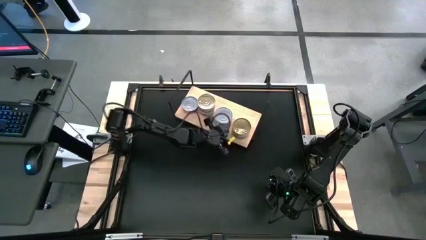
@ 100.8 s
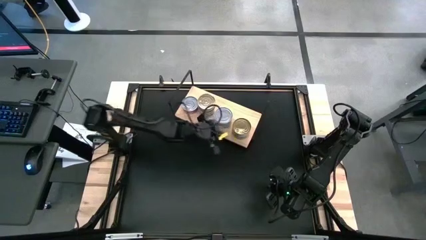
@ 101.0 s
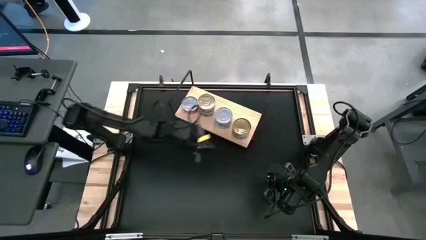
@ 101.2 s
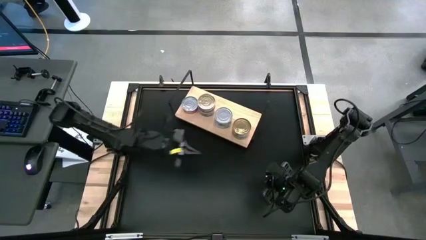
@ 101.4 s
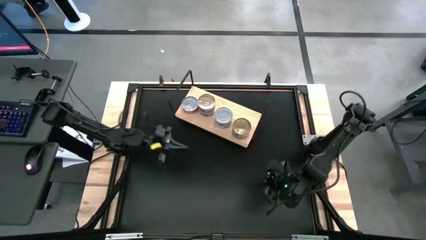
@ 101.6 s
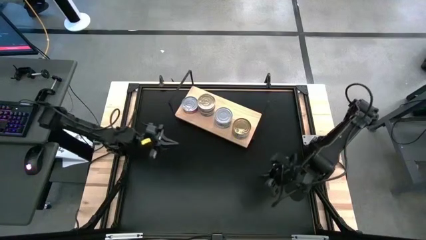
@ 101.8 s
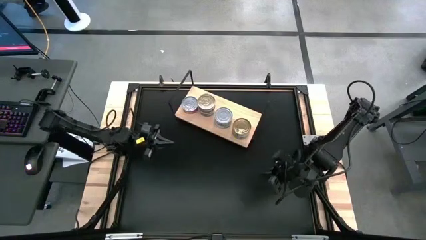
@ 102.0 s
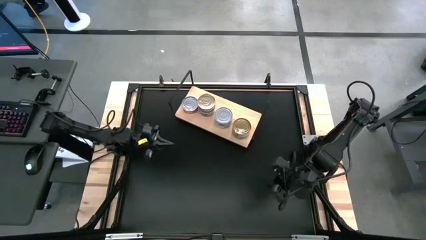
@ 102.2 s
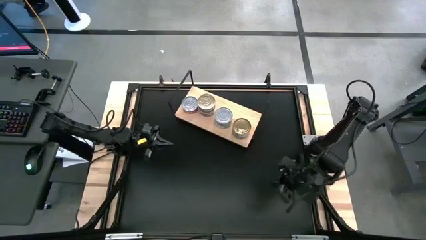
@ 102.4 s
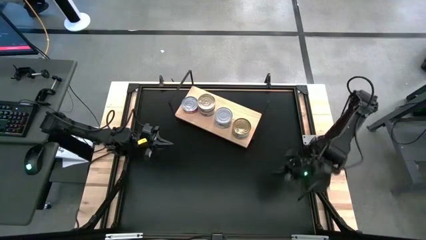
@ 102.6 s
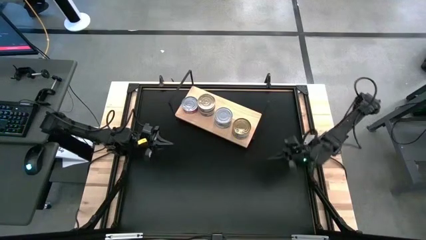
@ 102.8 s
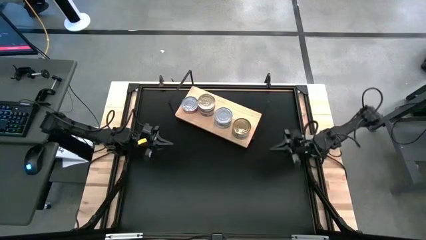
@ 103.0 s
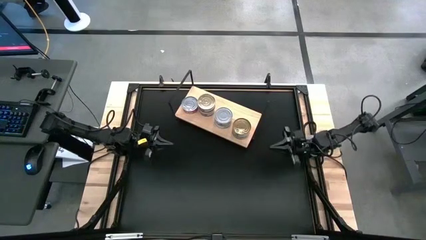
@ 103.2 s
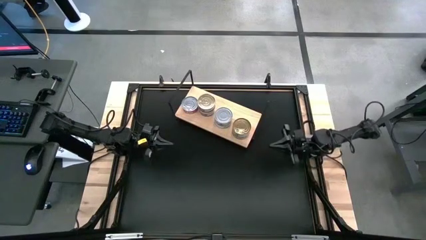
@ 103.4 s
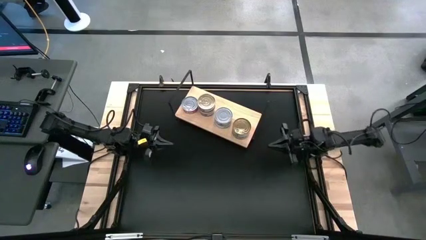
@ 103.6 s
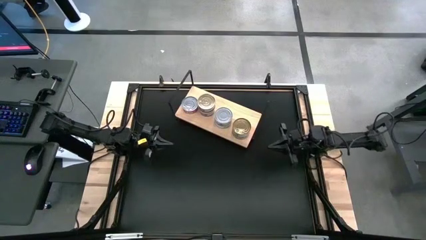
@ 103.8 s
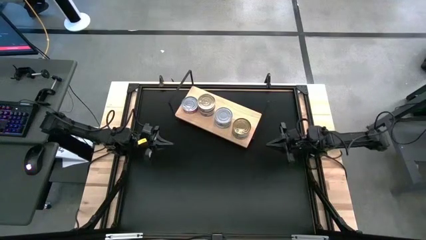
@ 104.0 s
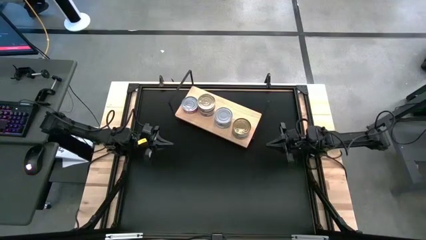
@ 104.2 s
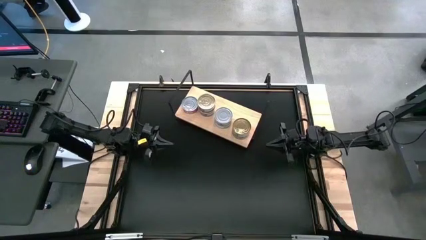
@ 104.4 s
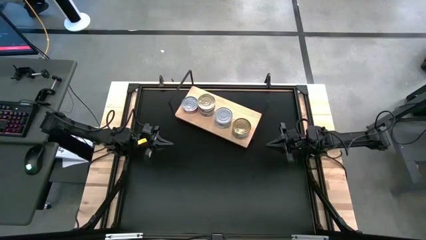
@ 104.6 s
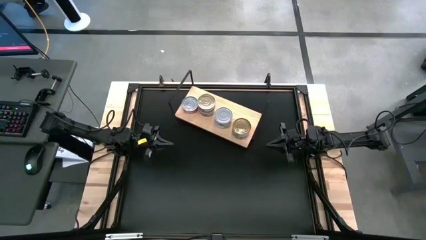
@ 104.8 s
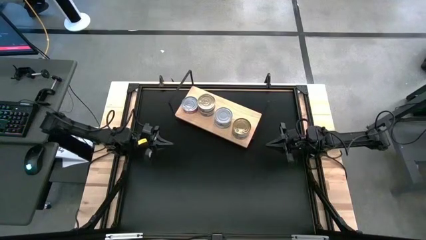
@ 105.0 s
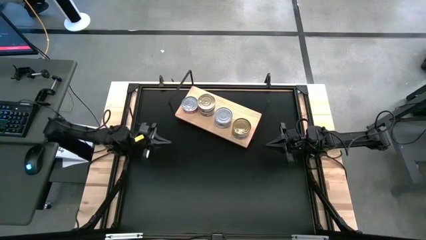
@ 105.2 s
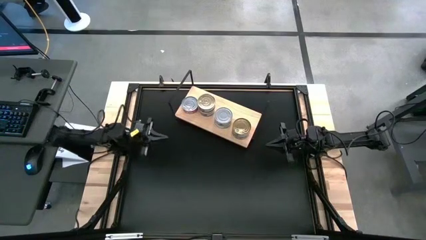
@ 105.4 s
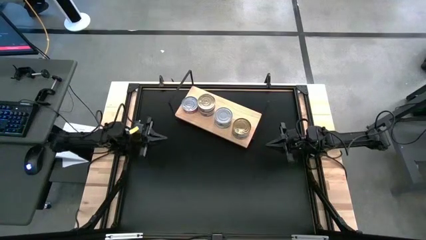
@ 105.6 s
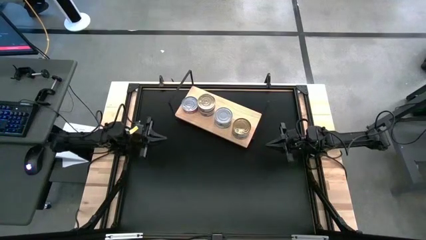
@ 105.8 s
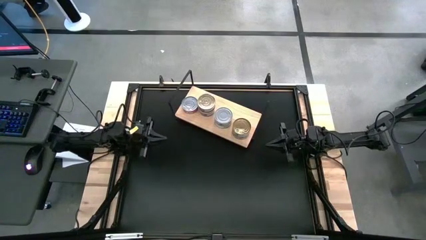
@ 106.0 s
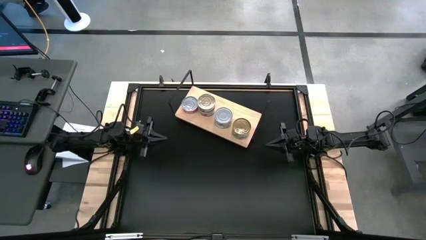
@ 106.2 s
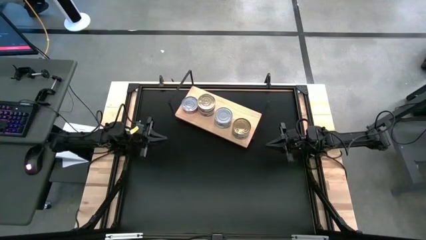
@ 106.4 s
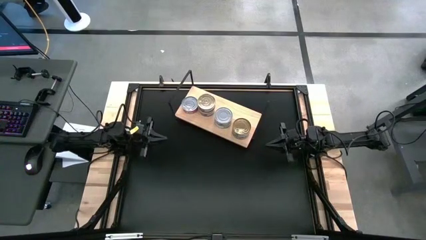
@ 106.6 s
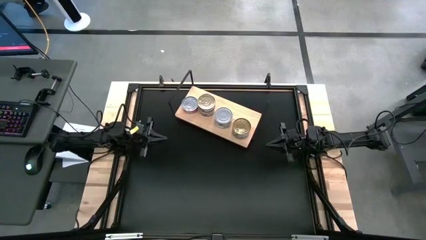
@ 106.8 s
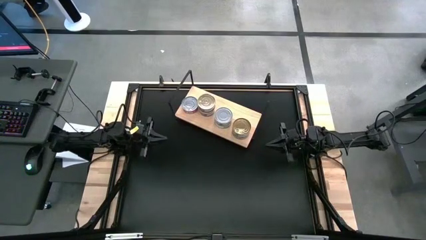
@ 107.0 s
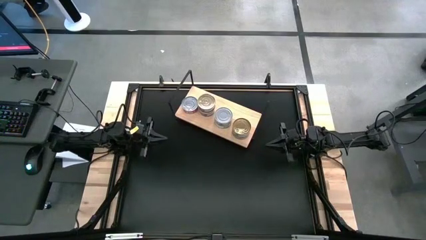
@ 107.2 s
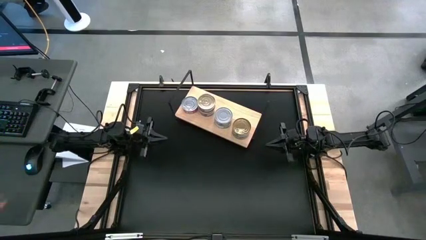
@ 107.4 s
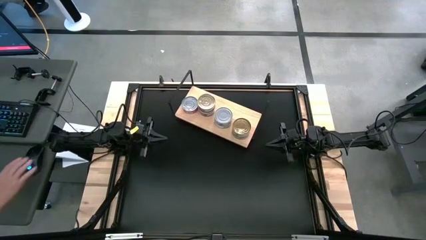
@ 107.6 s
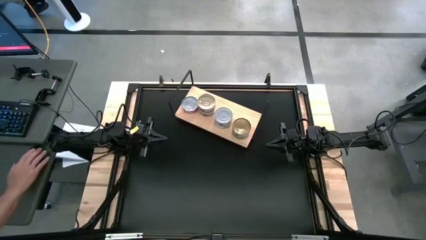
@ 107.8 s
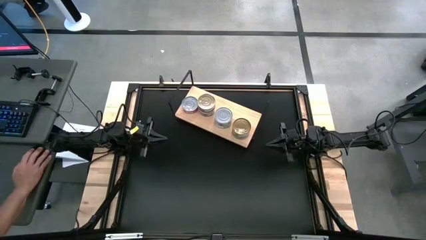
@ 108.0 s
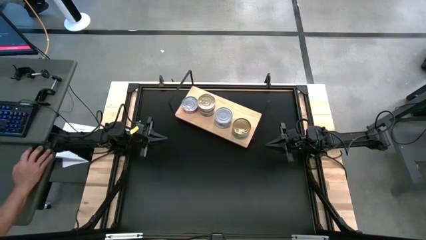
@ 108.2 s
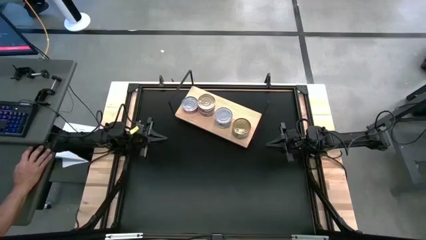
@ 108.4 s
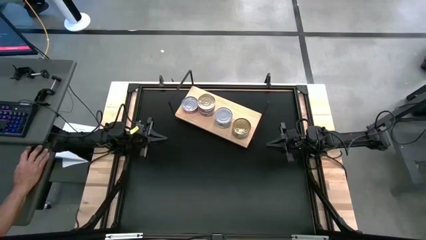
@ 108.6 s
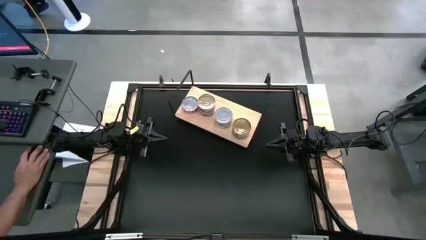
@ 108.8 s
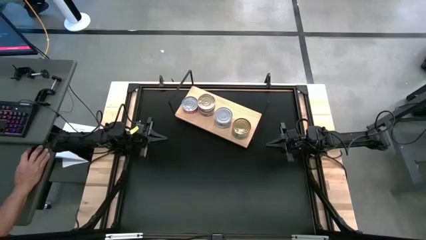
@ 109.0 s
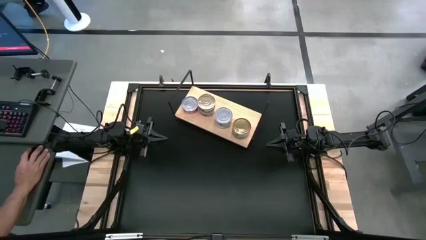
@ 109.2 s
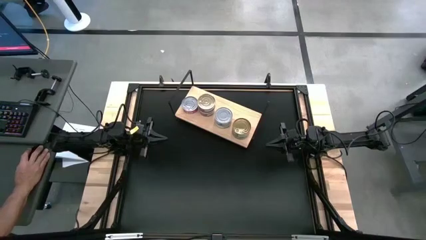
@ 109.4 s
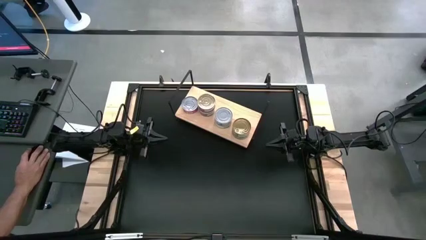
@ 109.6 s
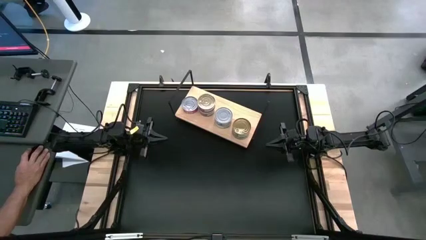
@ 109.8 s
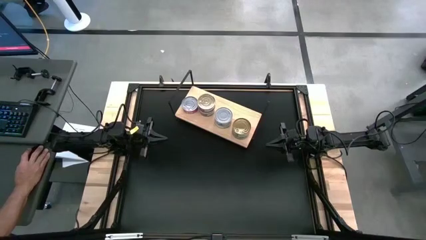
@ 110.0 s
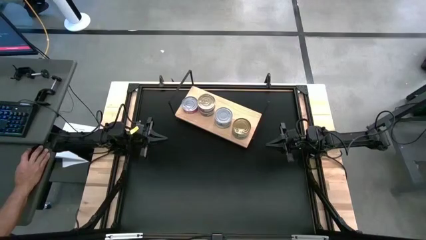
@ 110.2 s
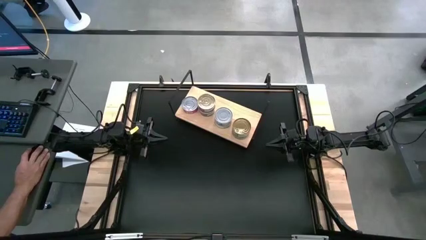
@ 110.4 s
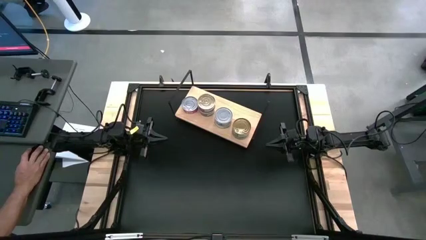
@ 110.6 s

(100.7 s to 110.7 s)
Task: Stack canned seafood by type on shelf
Return to Home Position
